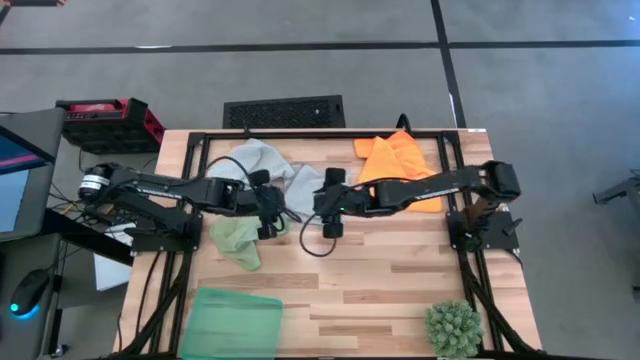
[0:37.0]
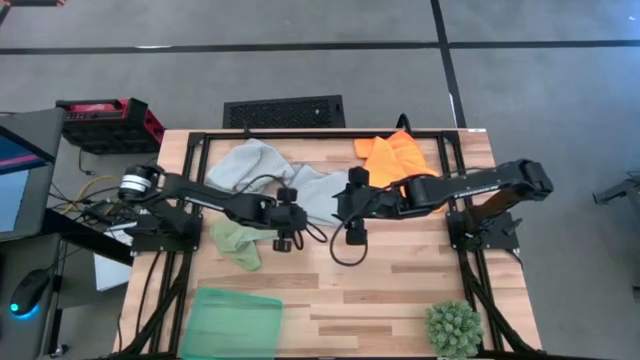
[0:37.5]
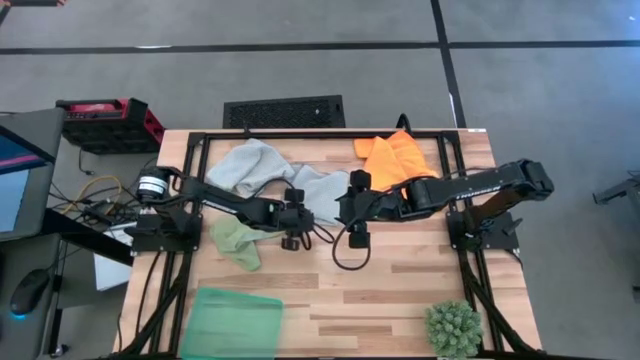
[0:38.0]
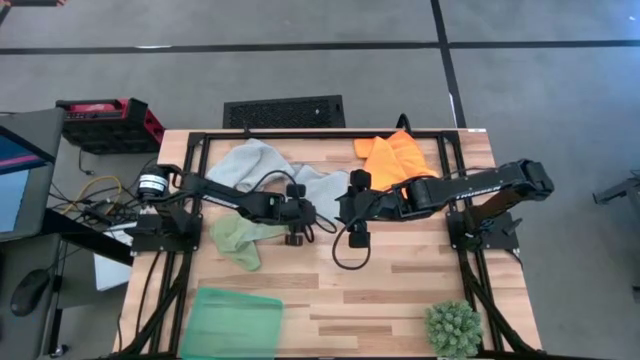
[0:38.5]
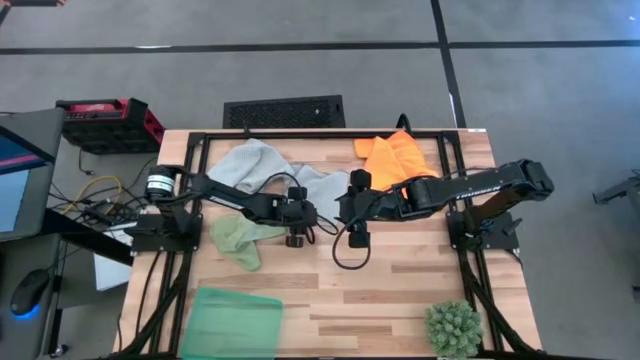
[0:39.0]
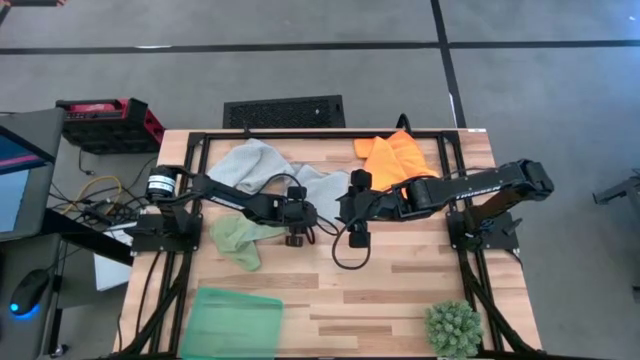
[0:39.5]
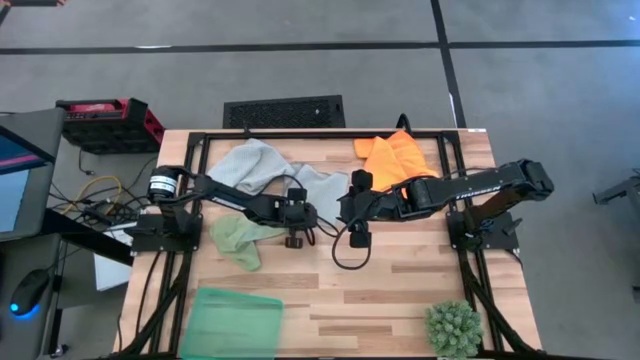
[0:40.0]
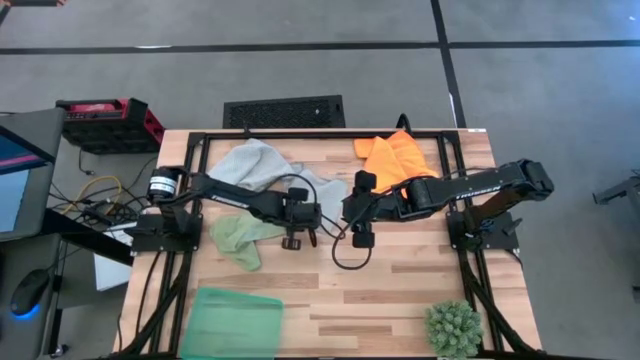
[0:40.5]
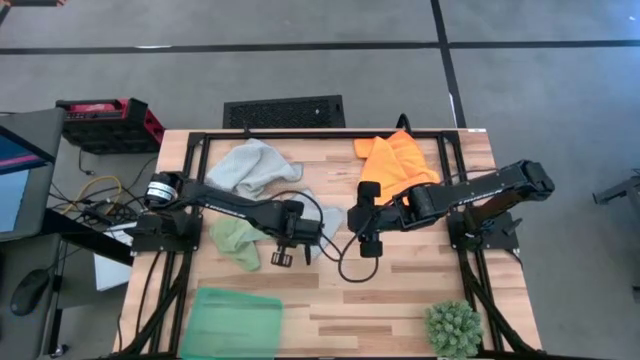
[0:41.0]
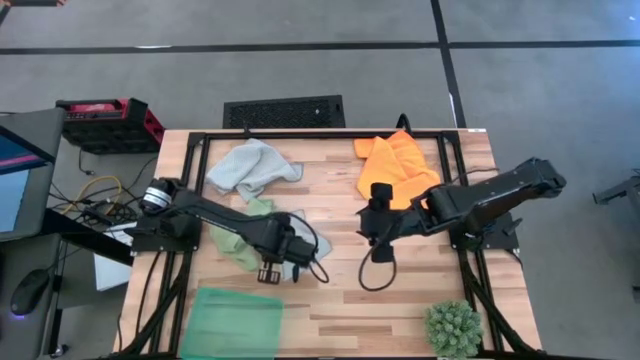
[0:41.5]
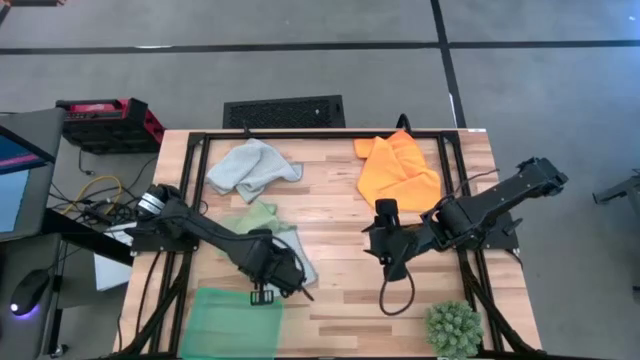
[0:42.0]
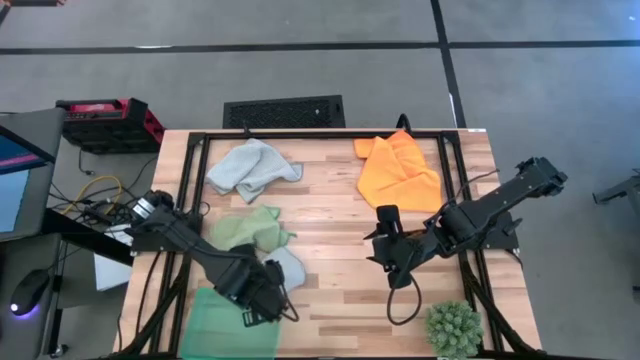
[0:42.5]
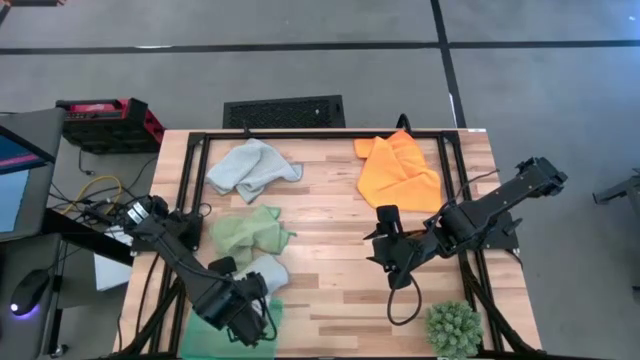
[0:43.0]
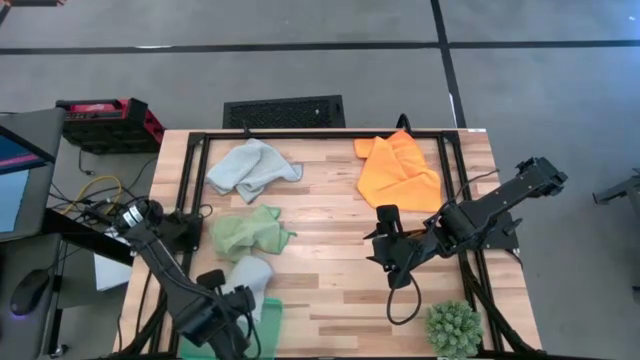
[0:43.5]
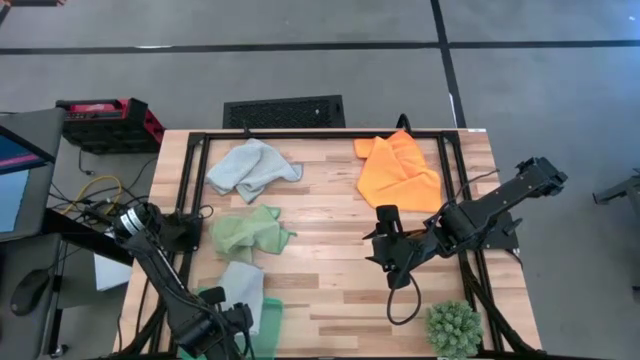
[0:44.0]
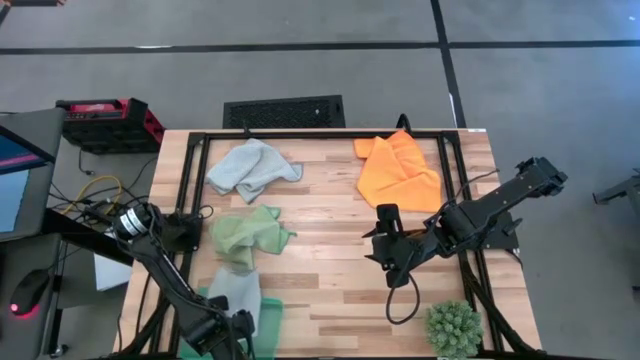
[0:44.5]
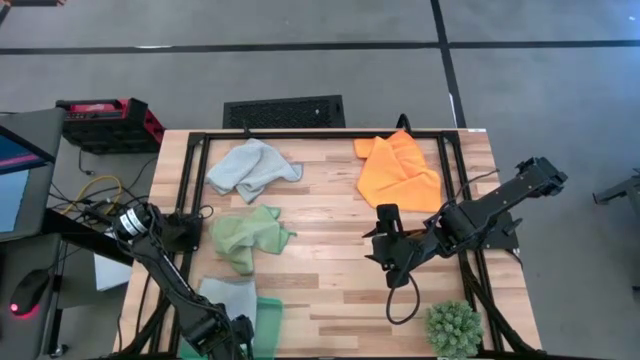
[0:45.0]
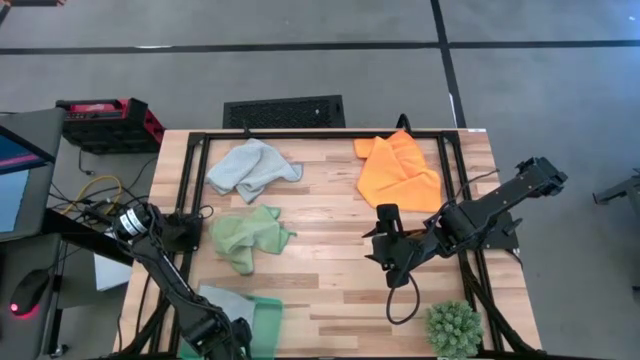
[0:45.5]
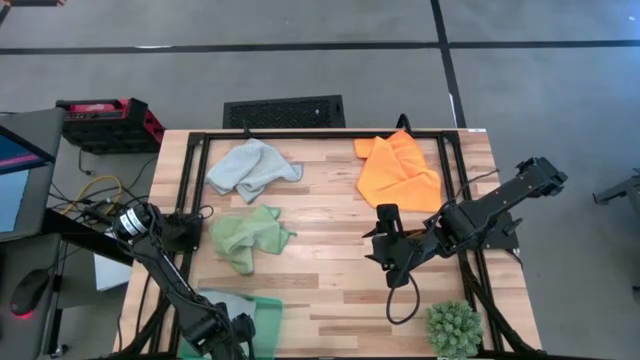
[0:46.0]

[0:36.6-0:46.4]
Task: Fold microfiber towels
Put the bottom gray microfiber cloth into the green bin

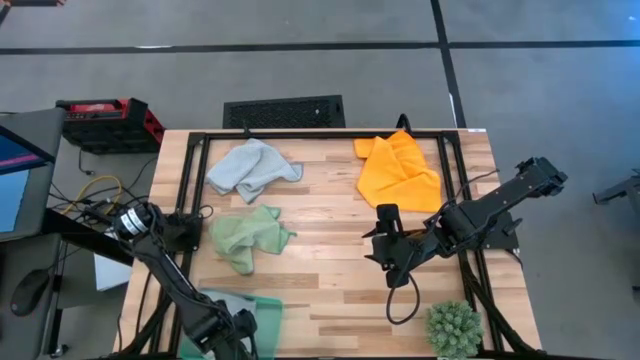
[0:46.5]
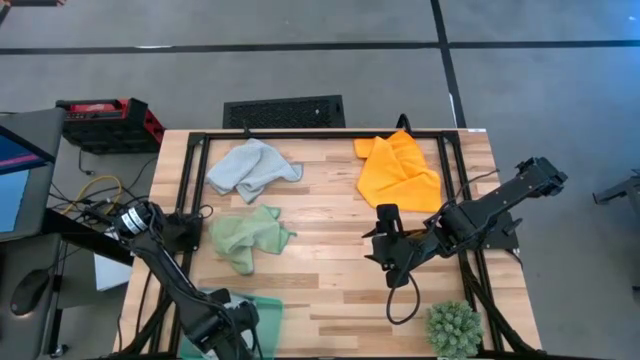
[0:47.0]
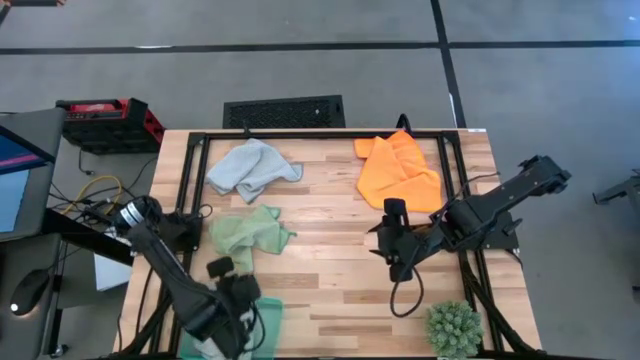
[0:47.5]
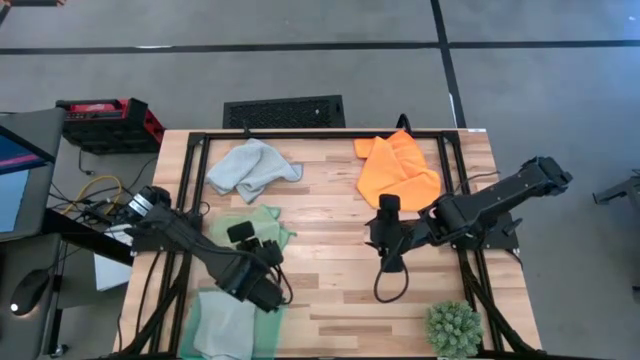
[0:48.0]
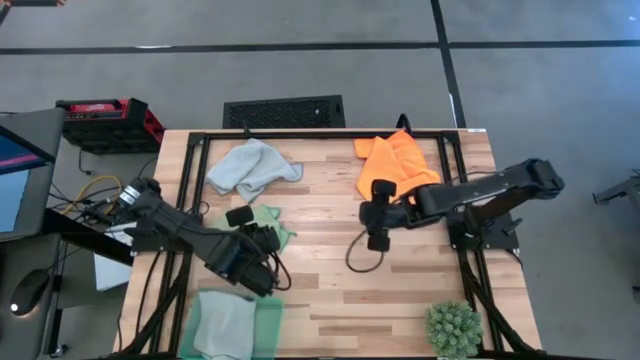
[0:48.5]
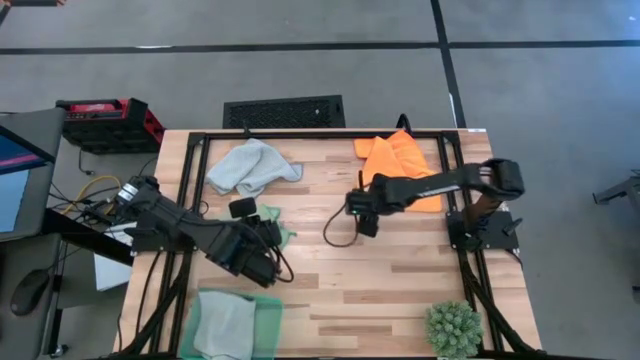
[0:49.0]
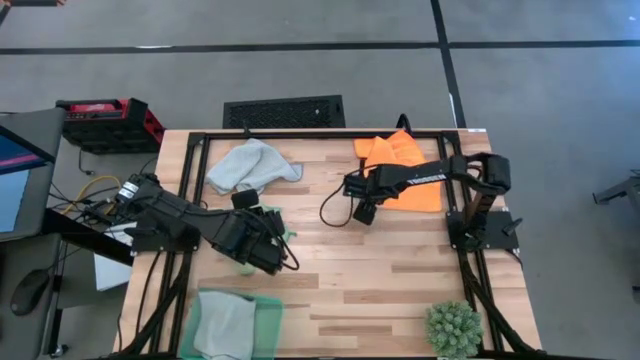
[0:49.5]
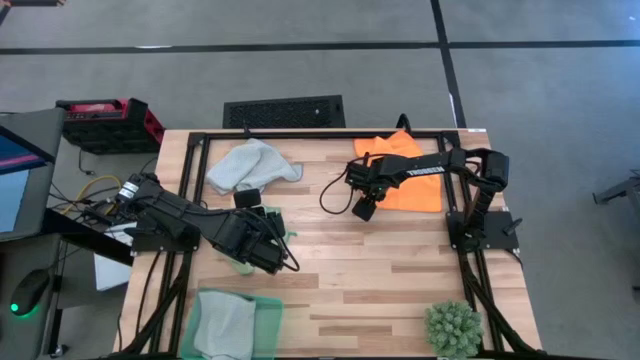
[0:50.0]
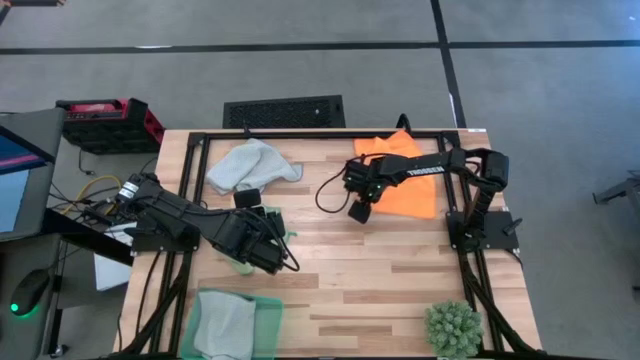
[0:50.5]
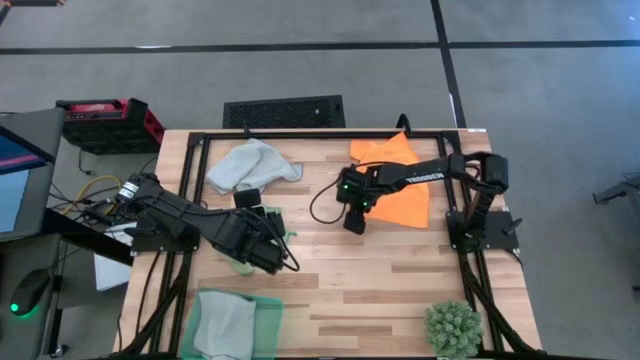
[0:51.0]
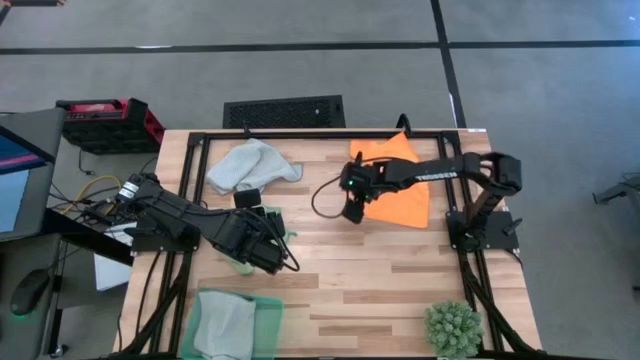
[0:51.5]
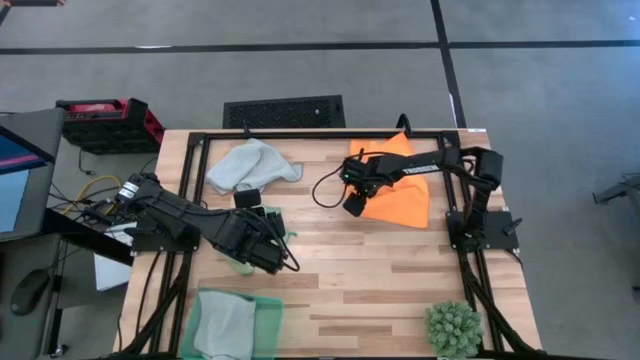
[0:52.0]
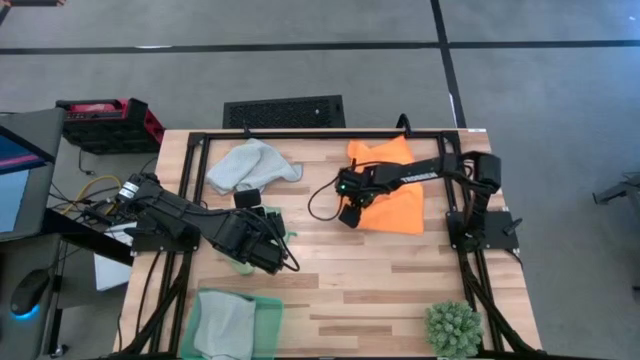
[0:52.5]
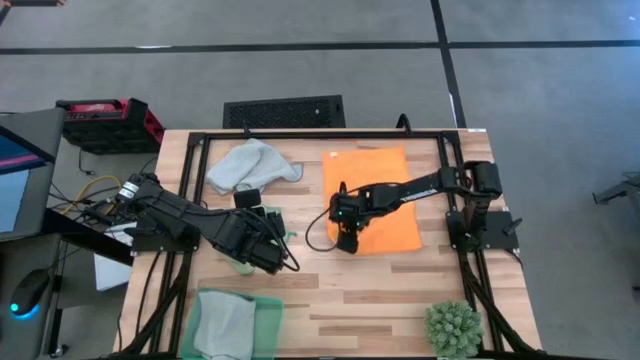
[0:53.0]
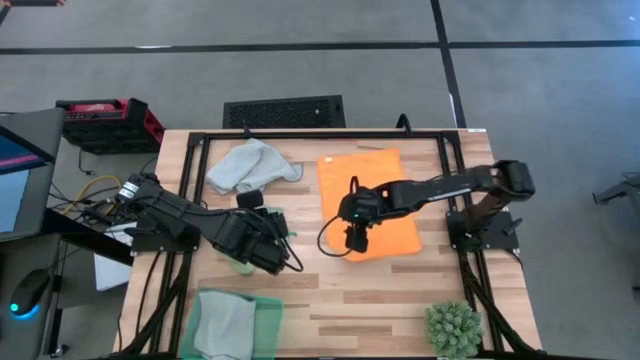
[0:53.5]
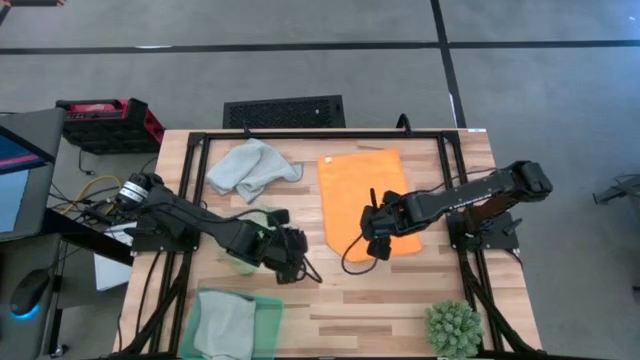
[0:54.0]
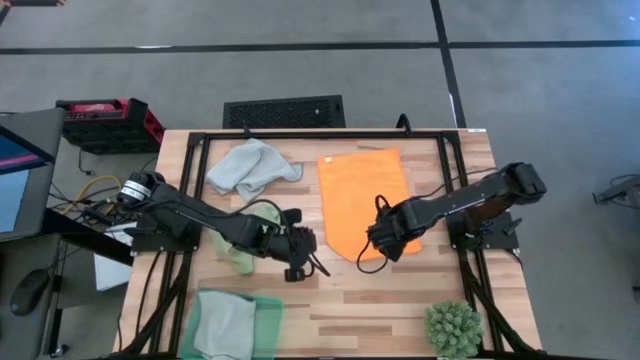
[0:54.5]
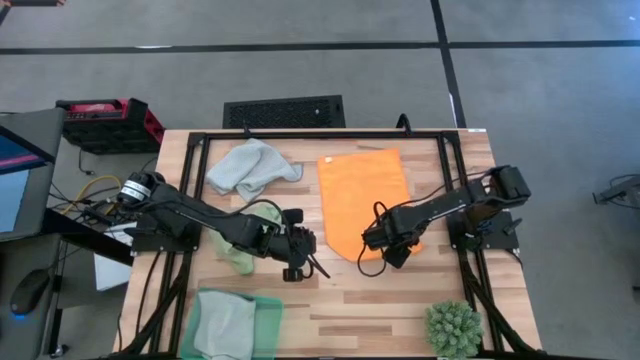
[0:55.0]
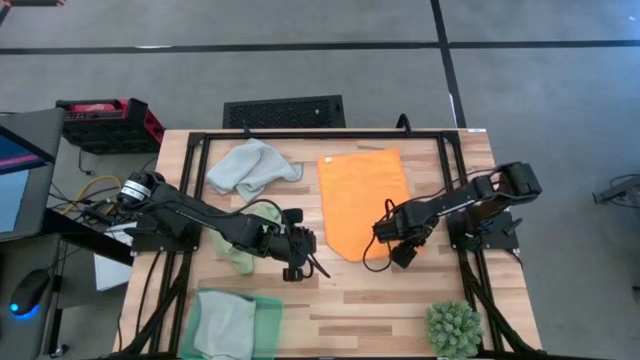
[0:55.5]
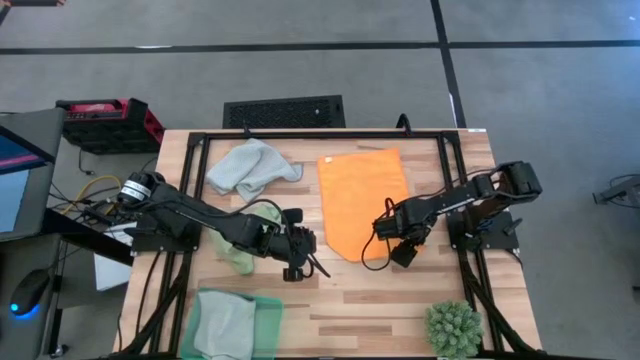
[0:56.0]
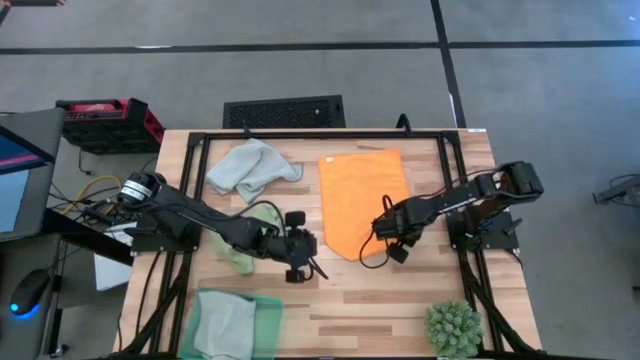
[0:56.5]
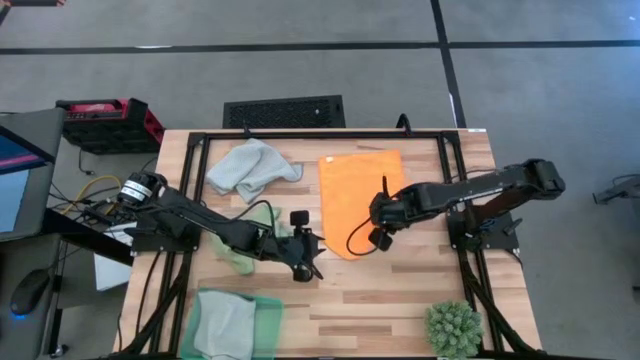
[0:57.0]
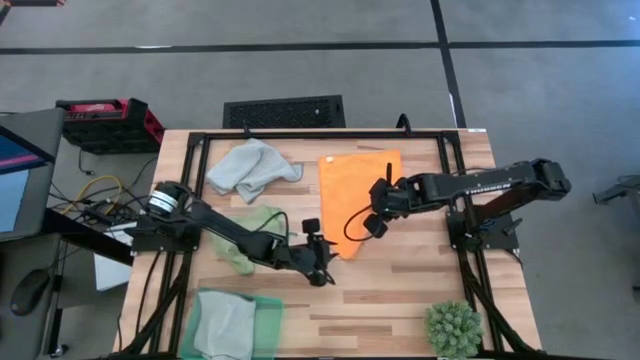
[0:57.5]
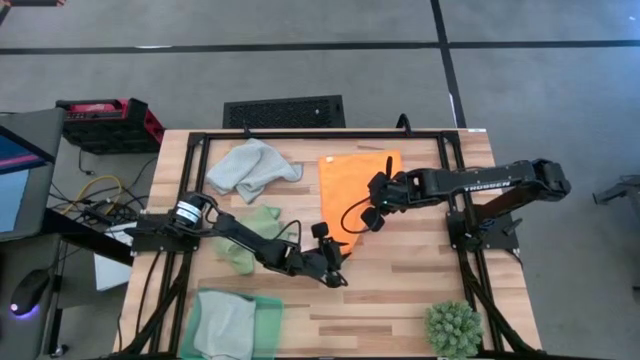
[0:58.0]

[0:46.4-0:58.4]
Fold the yellow microfiber cloth
